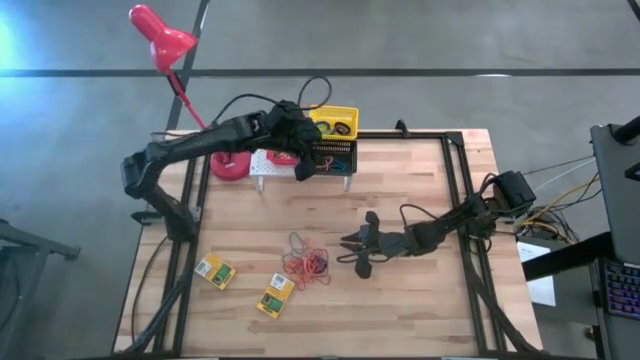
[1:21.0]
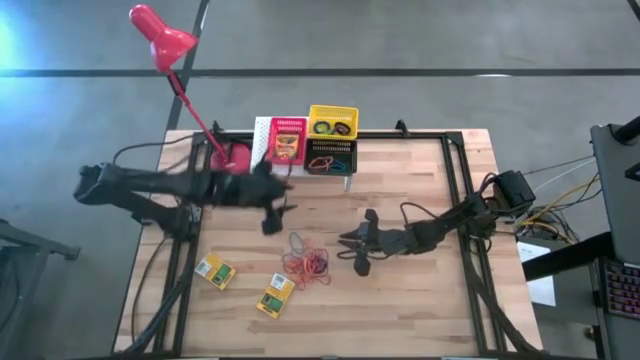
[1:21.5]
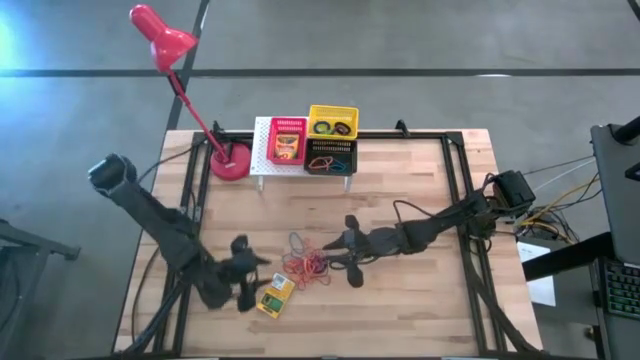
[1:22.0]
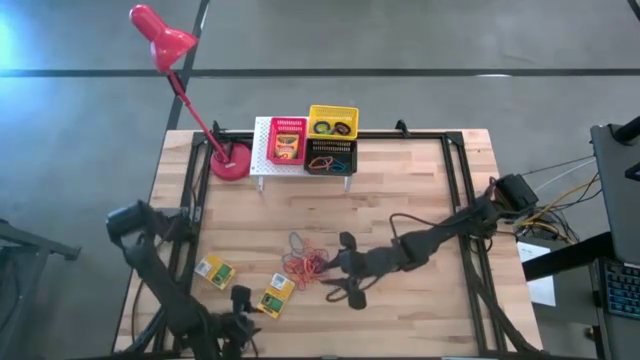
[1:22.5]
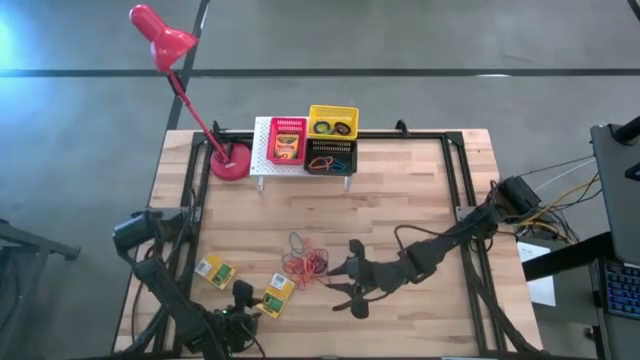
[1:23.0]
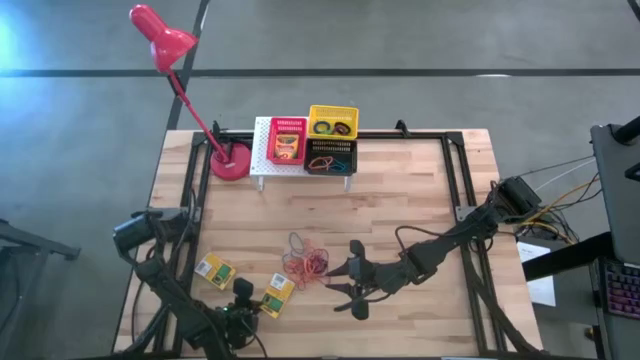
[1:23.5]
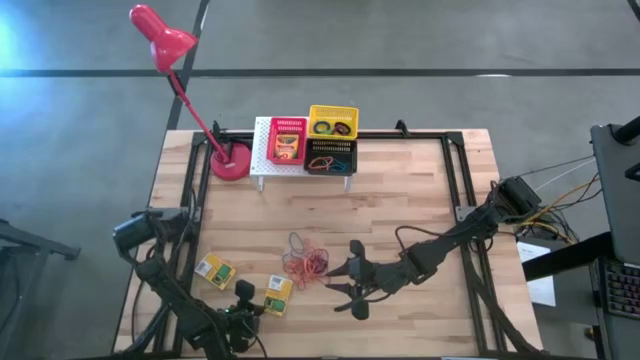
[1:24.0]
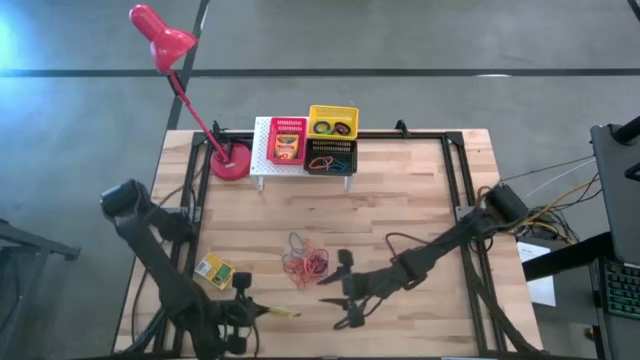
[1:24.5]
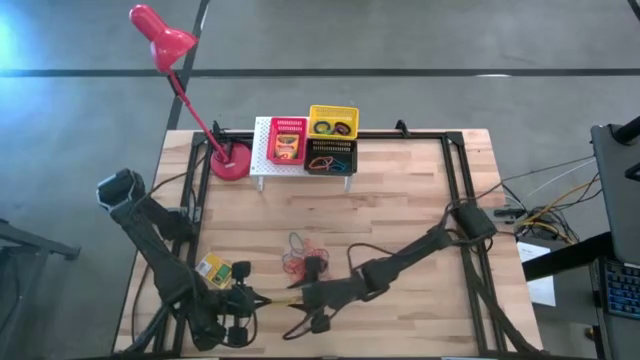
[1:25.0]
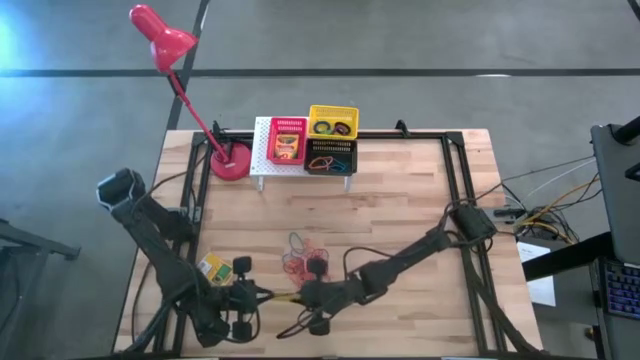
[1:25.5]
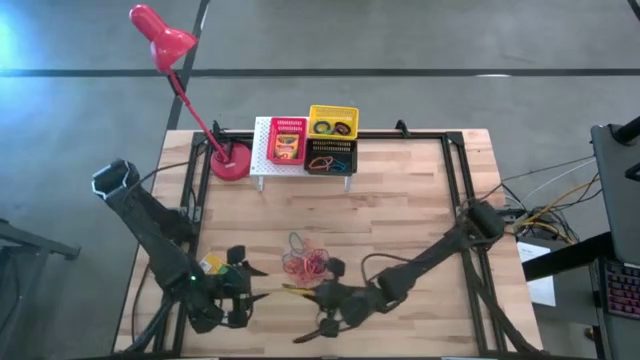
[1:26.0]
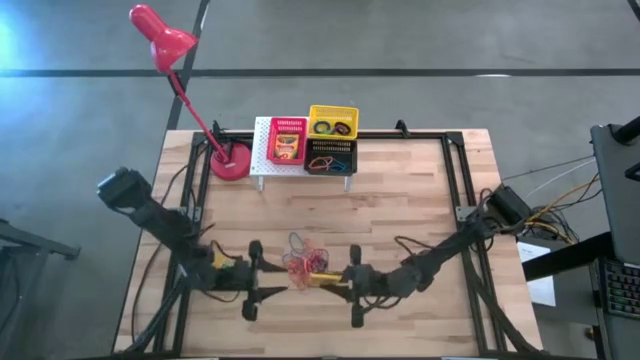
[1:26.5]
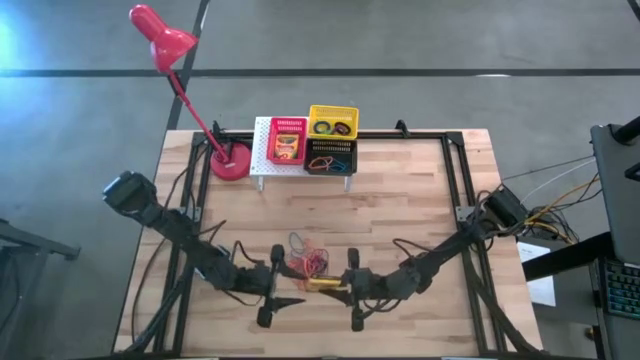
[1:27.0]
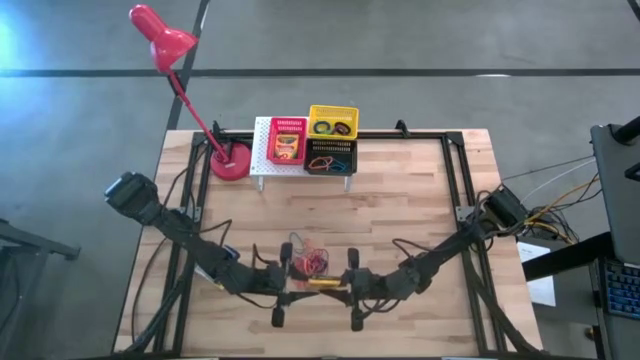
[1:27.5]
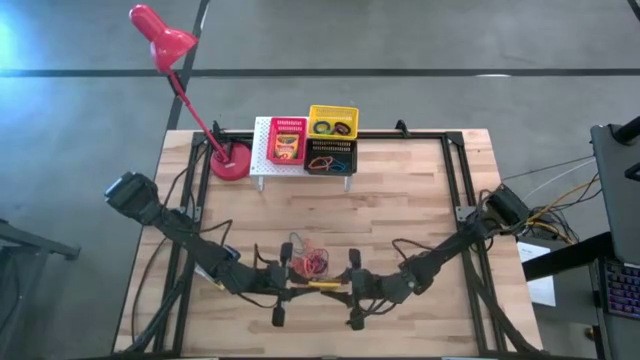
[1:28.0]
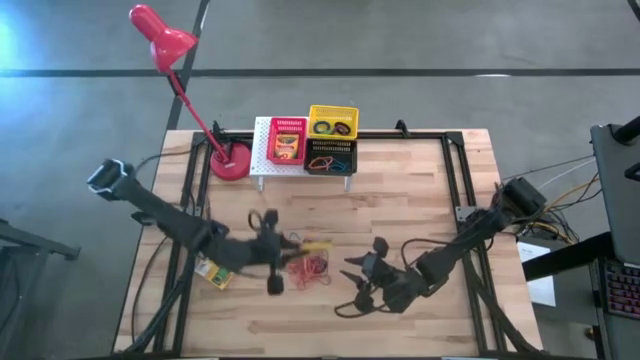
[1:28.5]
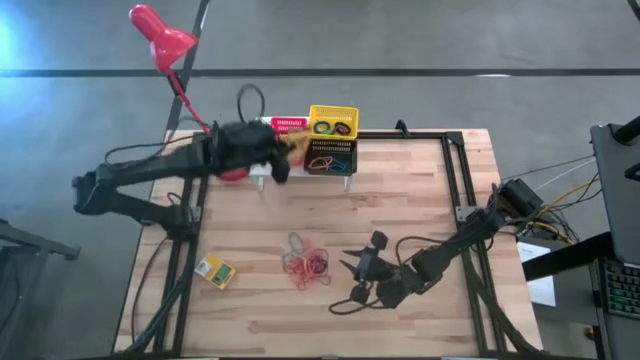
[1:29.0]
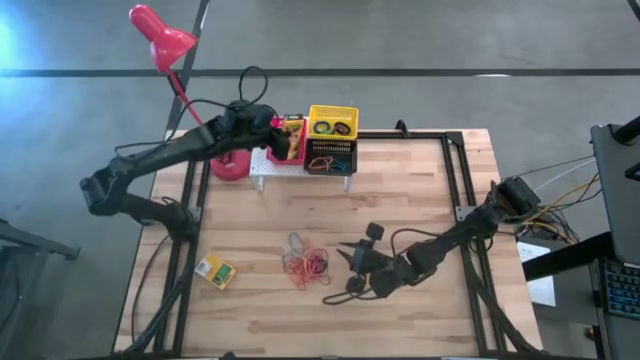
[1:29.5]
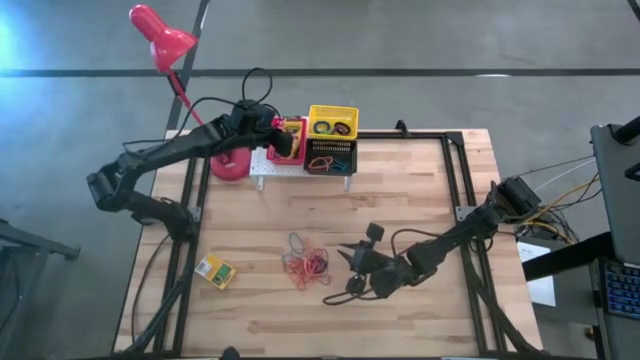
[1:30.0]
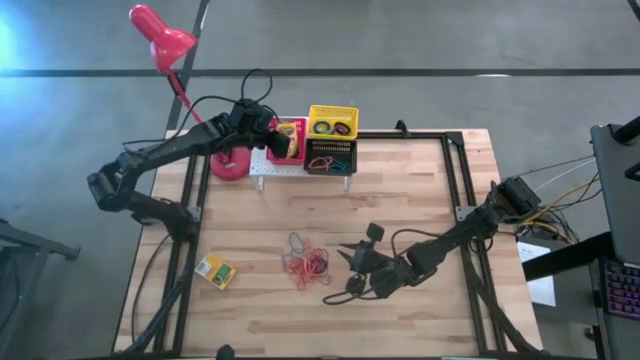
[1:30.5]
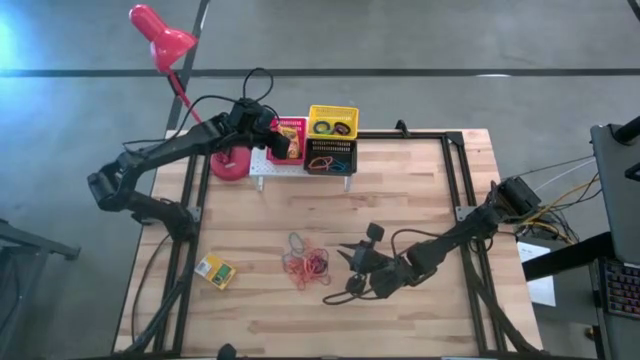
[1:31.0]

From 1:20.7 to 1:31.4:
Task: Pick & Place Office Desk Supplies
Put the yellow crayon box into the red bin on the shelf

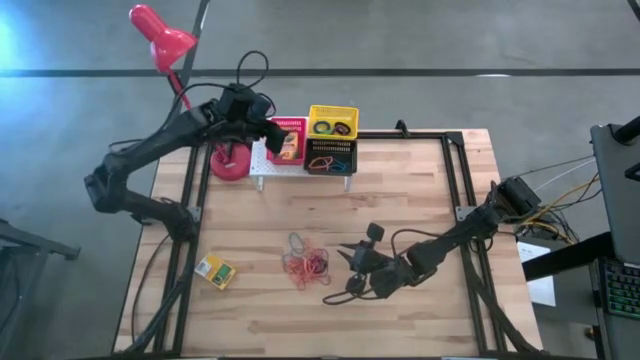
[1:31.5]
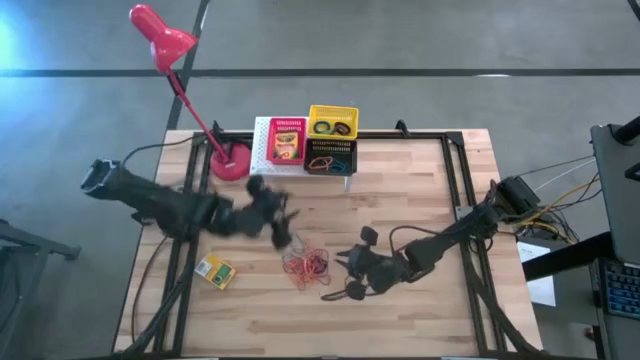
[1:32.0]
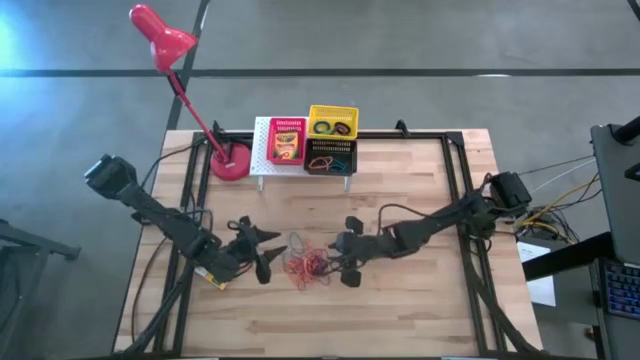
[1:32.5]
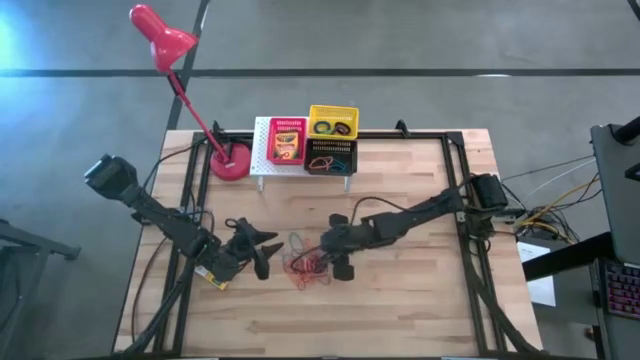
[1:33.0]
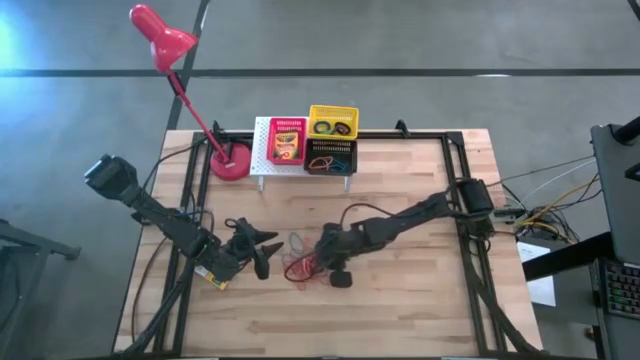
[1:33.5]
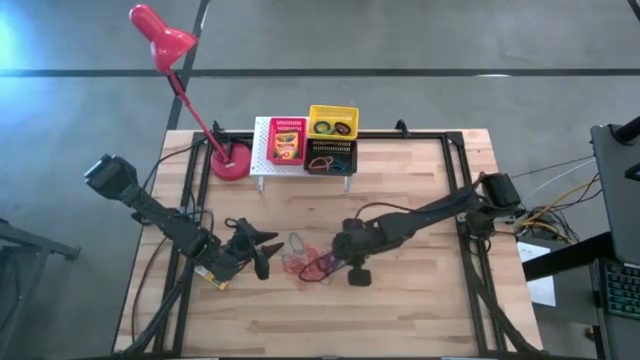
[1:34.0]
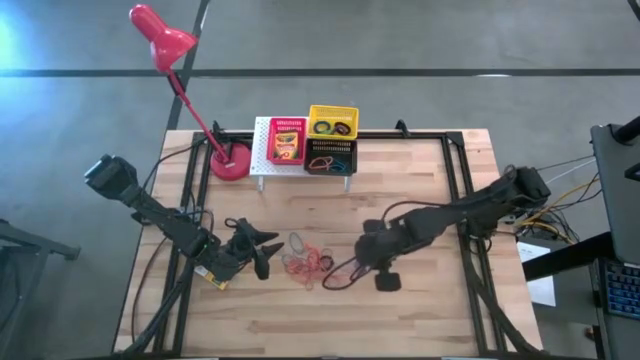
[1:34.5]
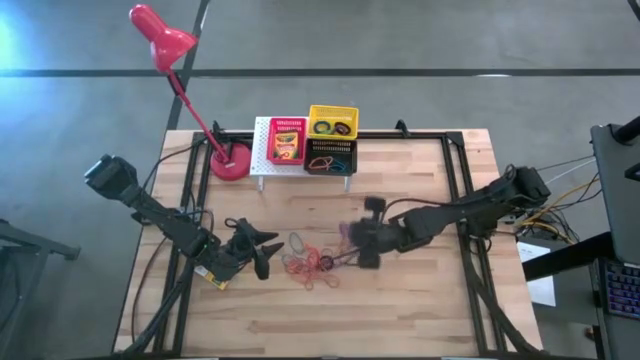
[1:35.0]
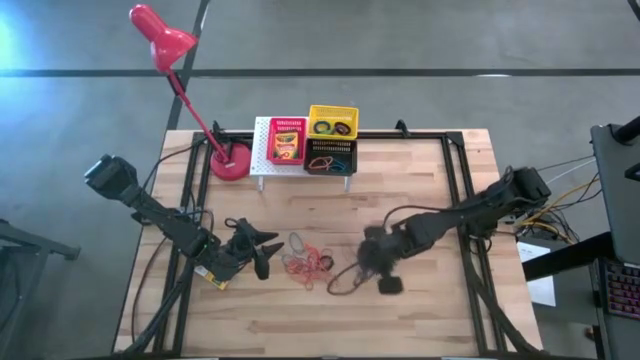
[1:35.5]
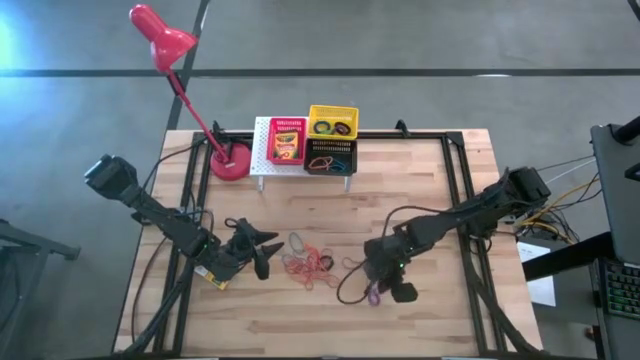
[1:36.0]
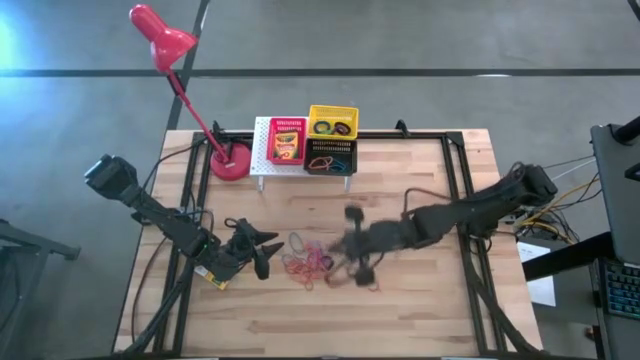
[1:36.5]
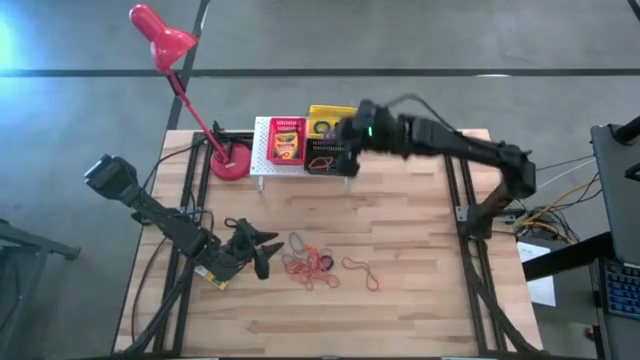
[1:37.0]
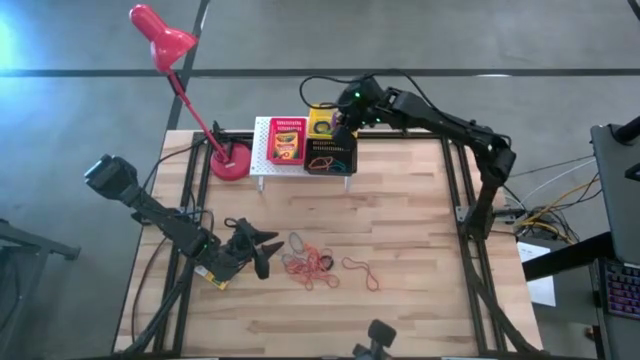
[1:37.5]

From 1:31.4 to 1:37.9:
Put the purple spring keychain into the yellow bin on the shelf

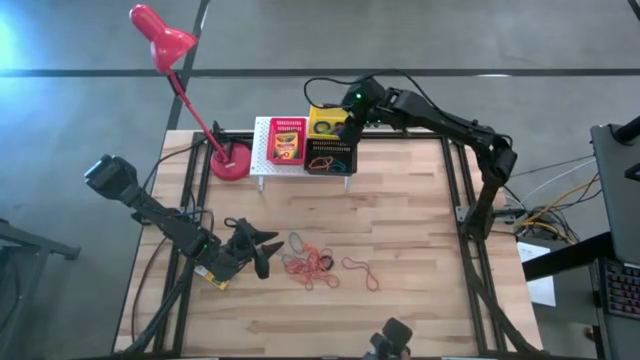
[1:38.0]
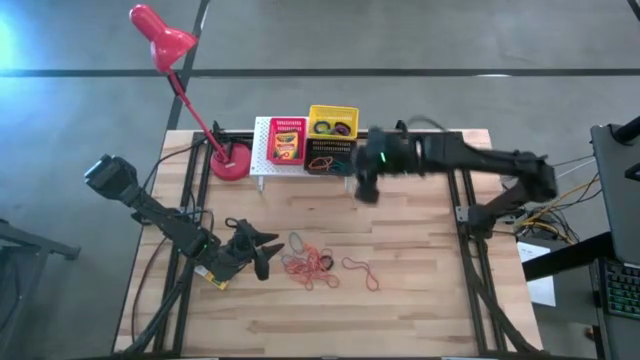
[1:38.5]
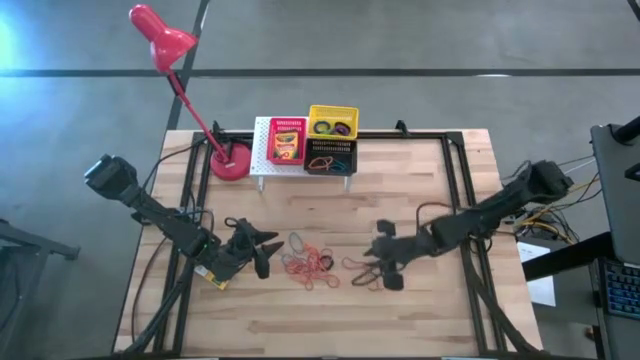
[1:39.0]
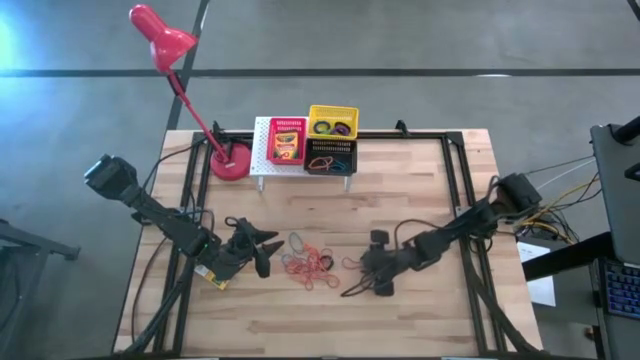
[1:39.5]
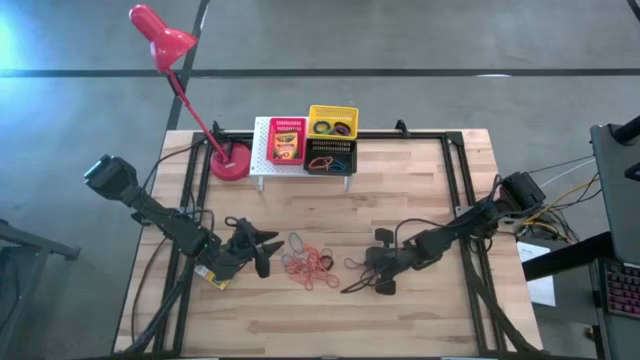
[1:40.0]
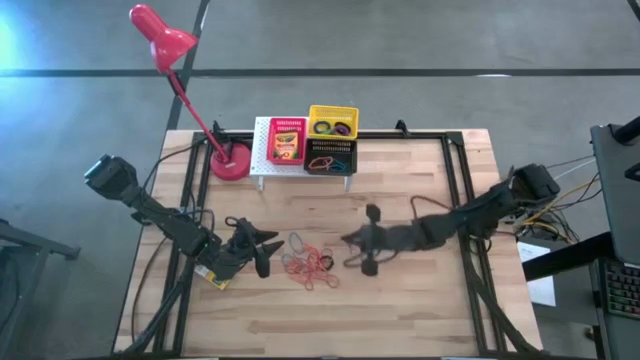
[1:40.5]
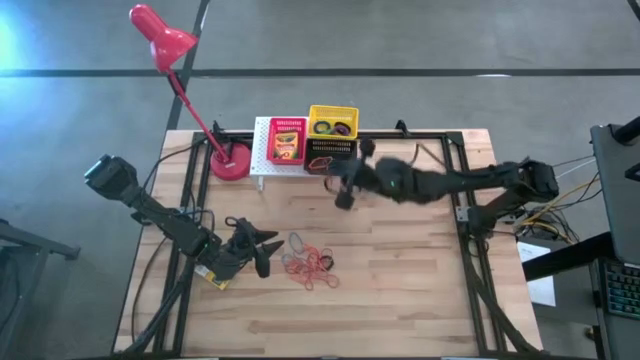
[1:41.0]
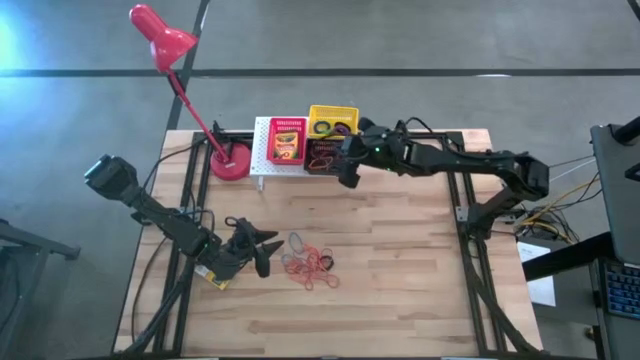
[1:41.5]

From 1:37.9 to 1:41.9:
Put the red rubber band into the black bin on the shelf

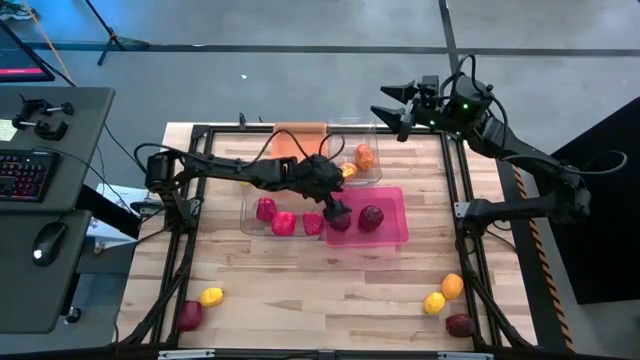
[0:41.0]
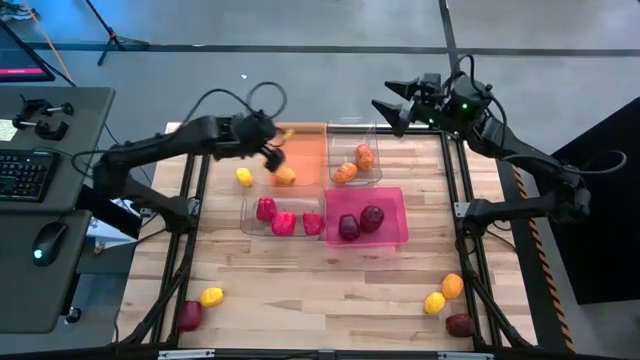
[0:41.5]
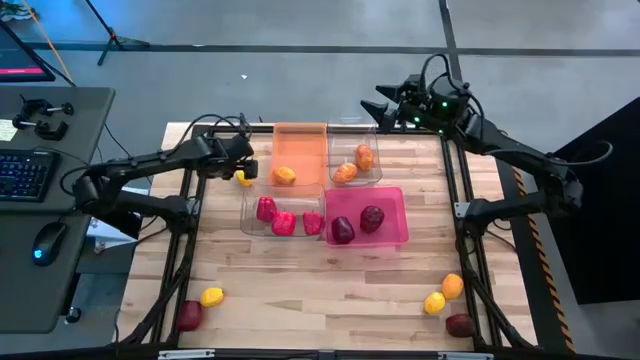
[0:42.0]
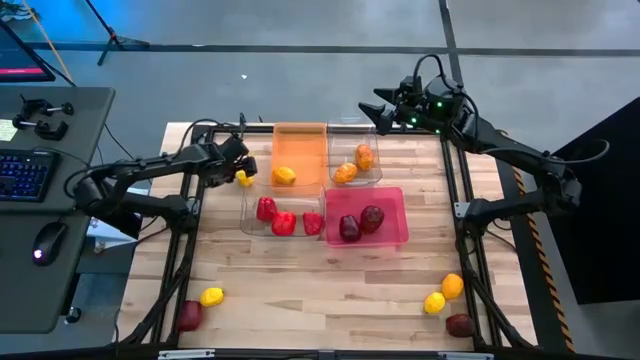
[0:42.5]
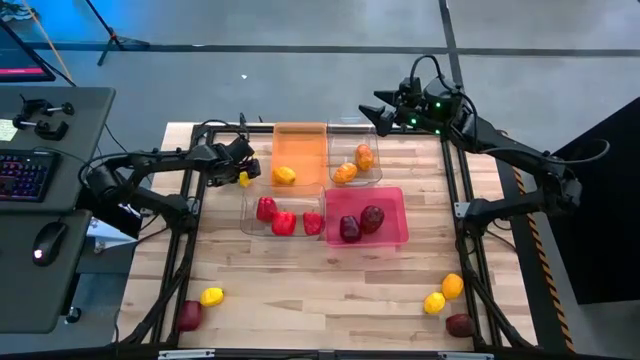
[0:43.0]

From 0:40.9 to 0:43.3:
Task: Sort produce into baskets
Put the lemon into the orange bin
